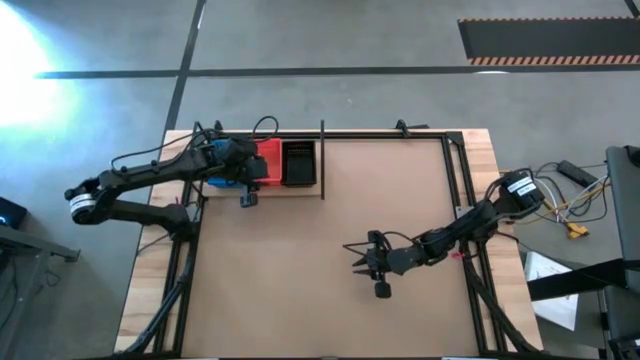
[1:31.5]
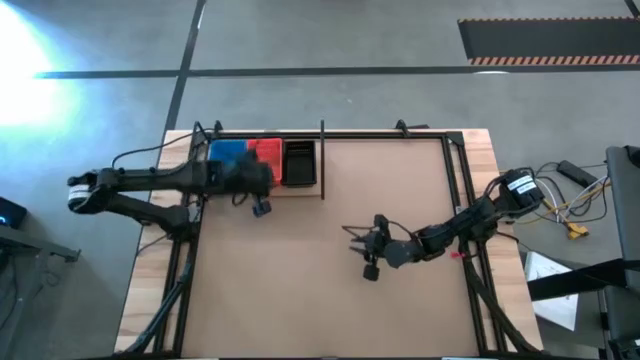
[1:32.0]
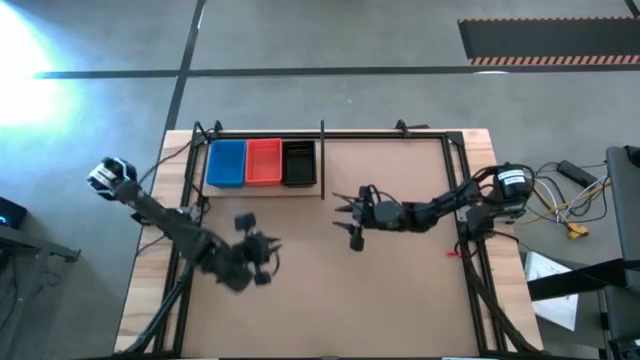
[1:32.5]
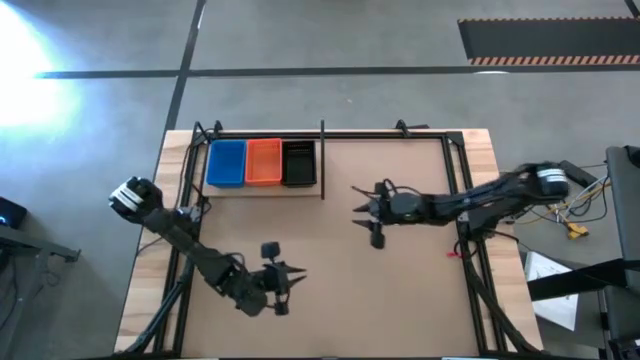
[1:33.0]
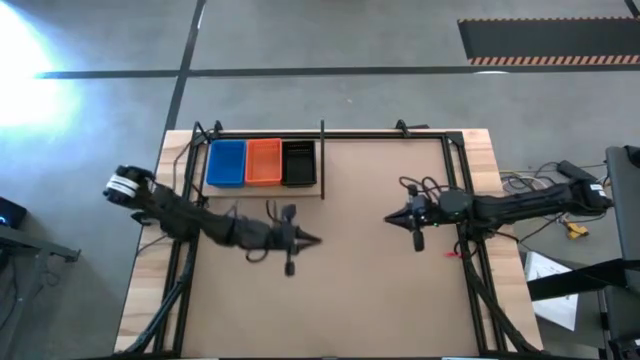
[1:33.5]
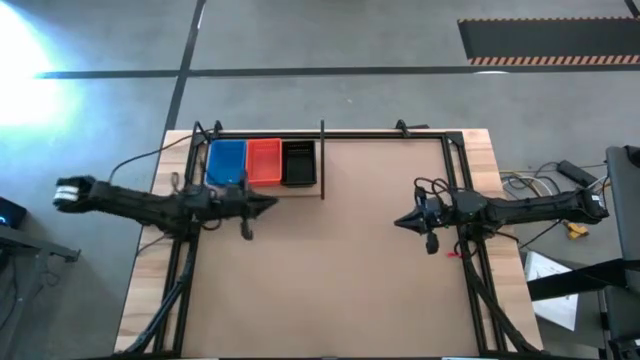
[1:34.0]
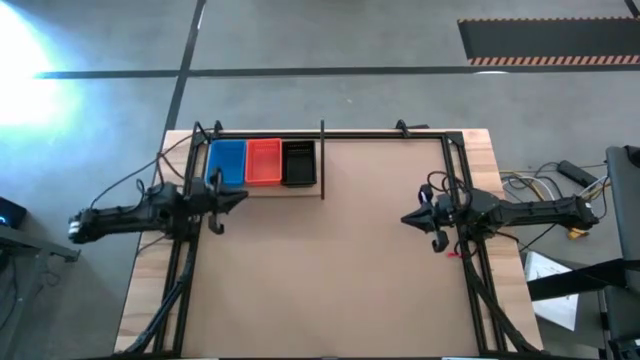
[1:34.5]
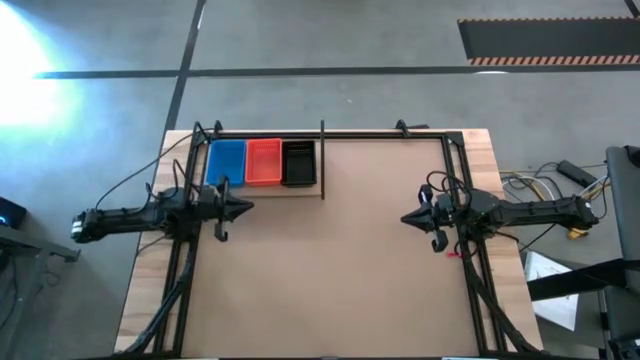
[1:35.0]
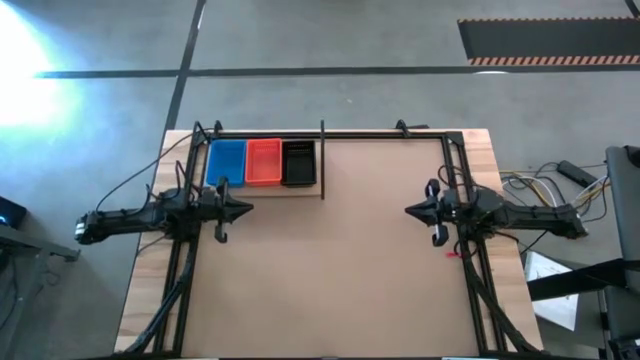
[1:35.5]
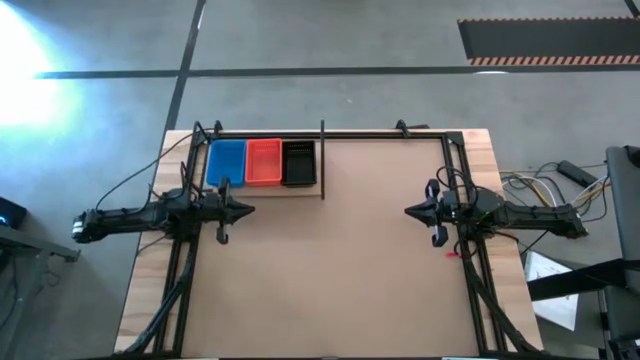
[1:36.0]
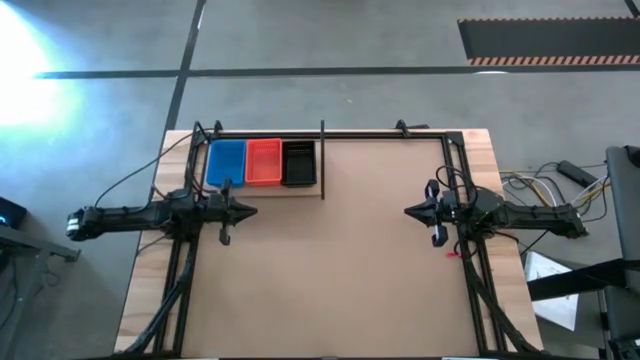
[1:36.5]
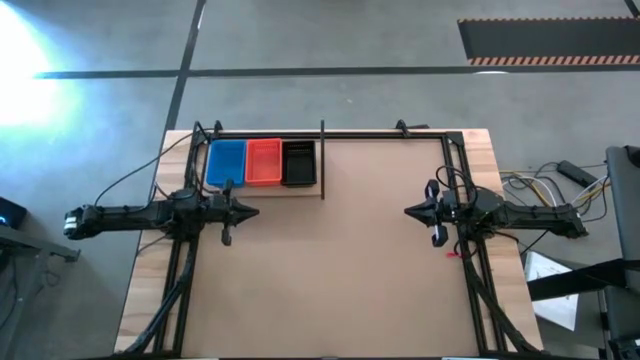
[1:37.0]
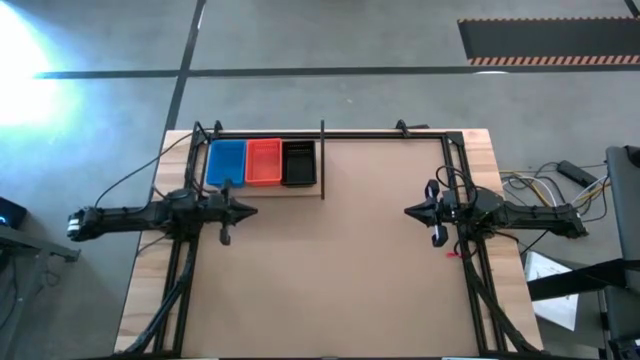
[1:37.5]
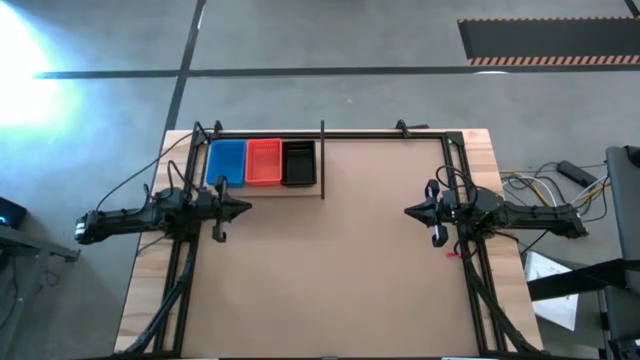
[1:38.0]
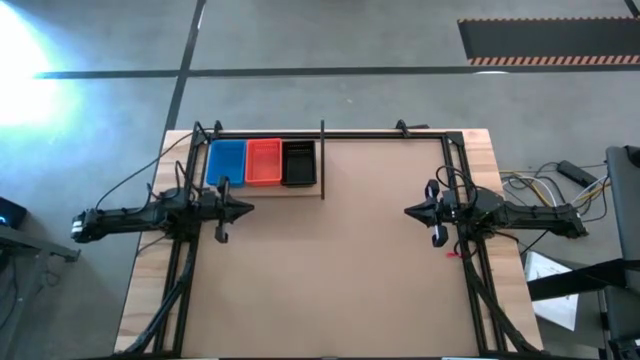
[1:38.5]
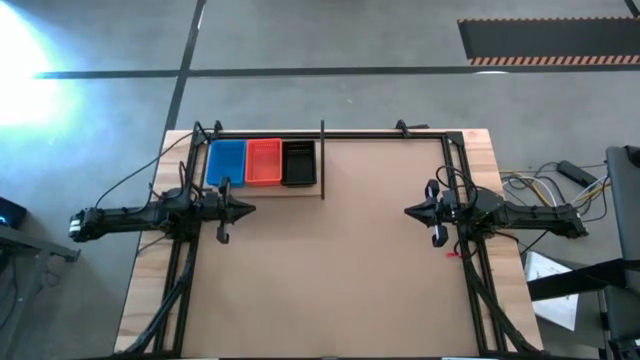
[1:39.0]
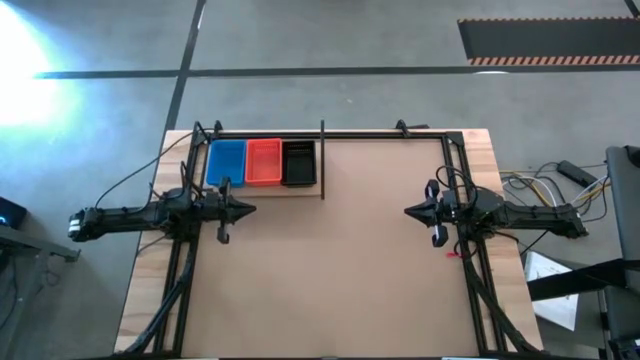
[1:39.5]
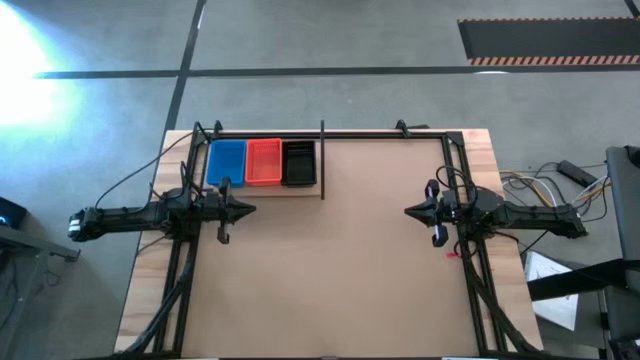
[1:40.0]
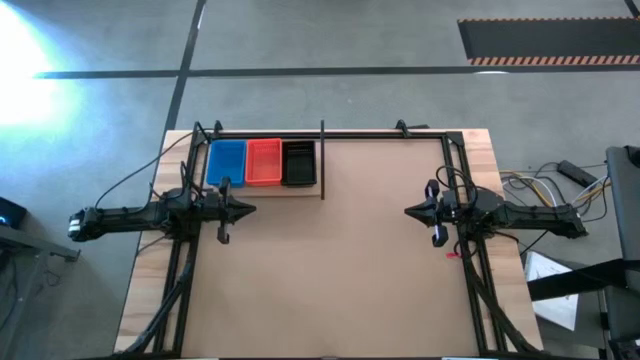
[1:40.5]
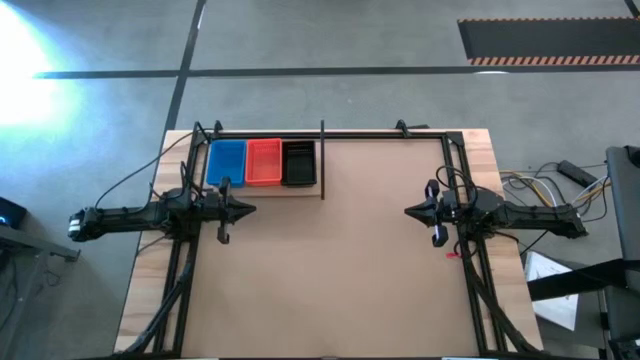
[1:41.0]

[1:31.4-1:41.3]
Task: Stack baskets on shelf by color
Return to Home Position

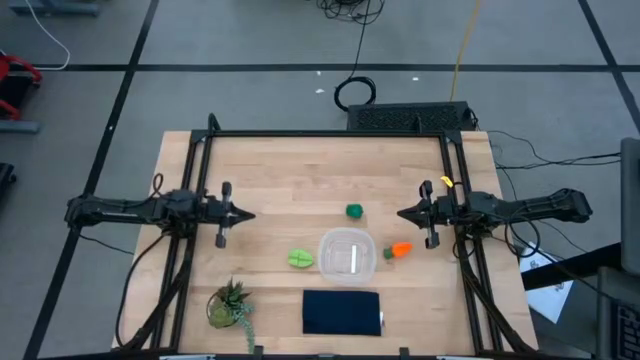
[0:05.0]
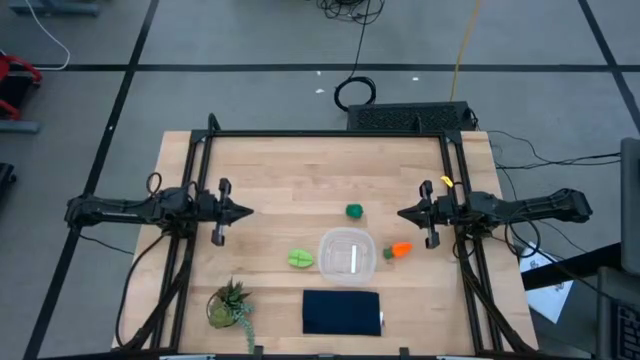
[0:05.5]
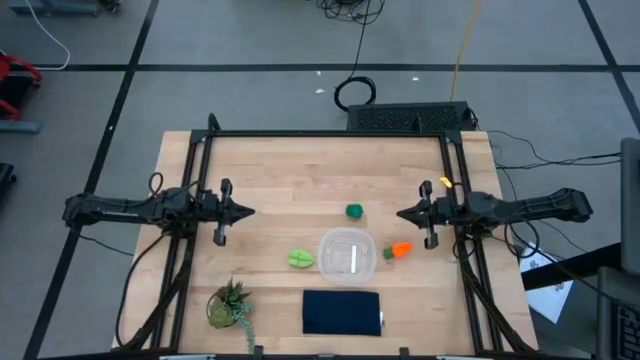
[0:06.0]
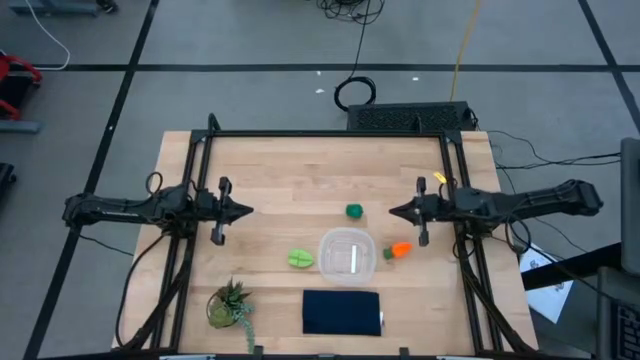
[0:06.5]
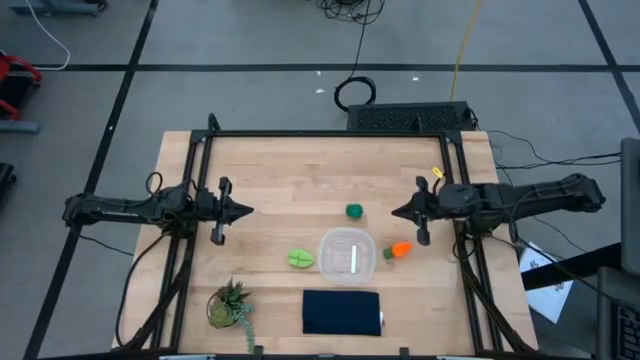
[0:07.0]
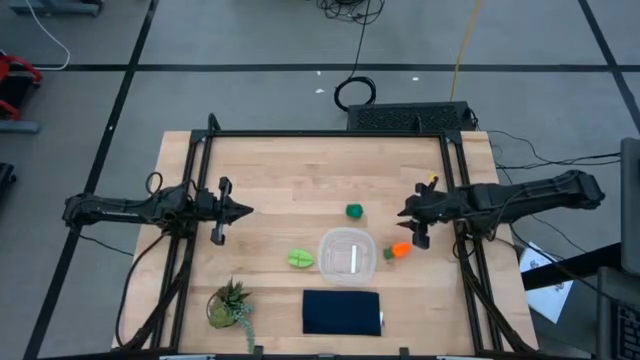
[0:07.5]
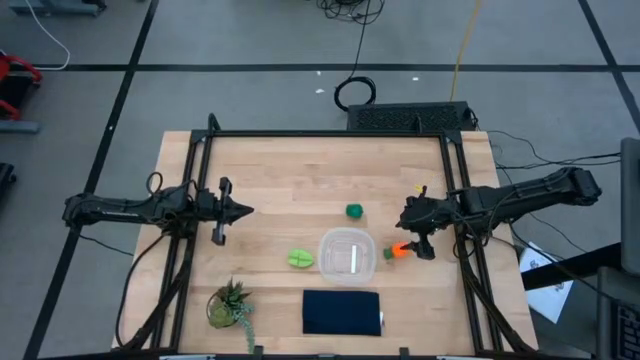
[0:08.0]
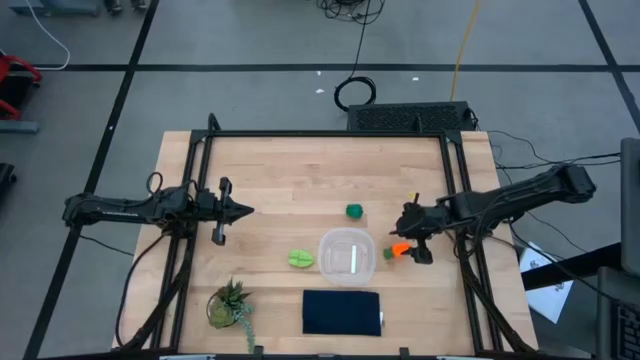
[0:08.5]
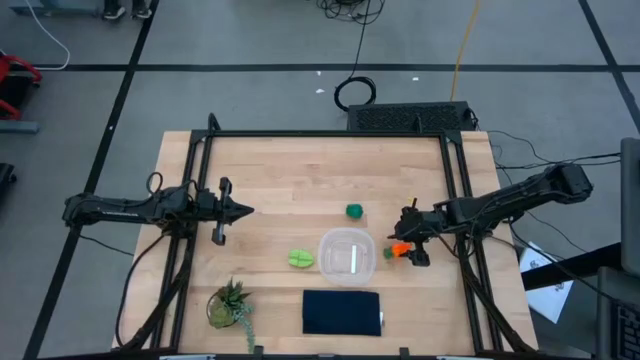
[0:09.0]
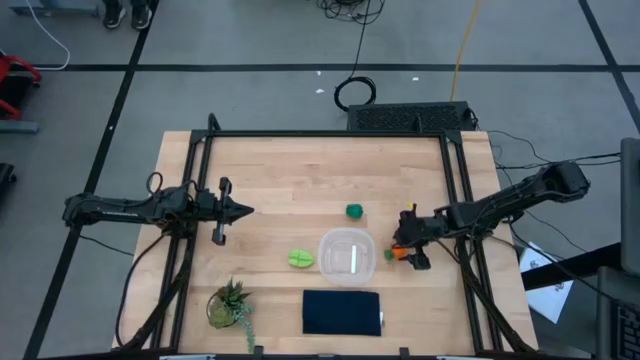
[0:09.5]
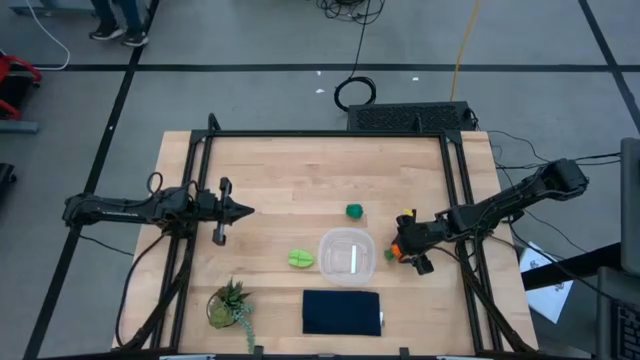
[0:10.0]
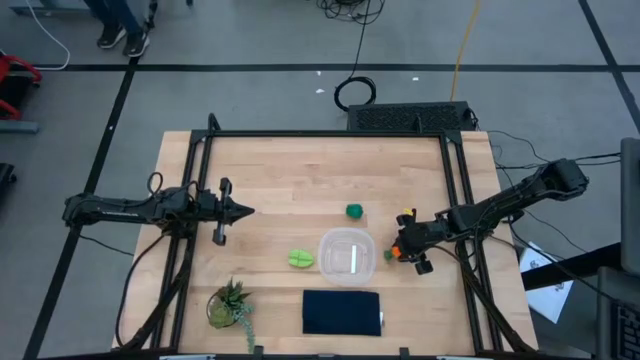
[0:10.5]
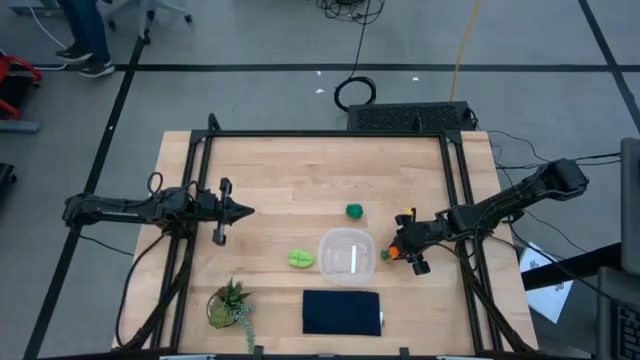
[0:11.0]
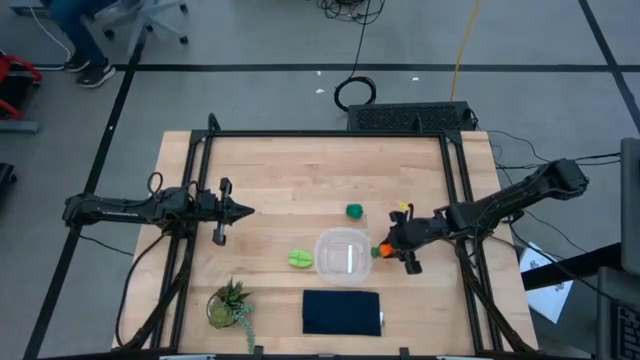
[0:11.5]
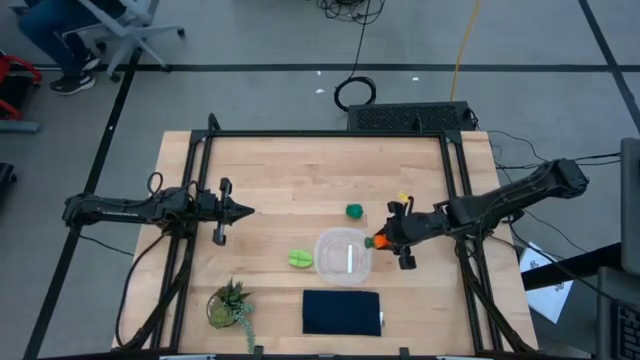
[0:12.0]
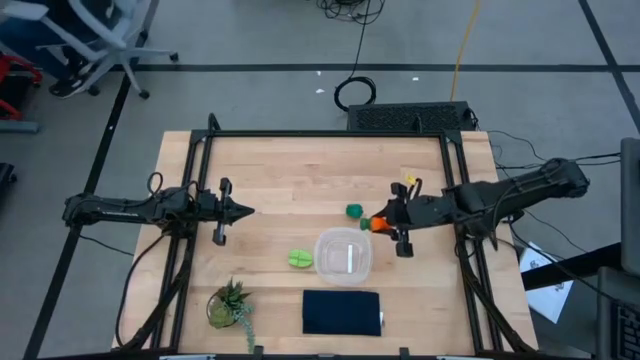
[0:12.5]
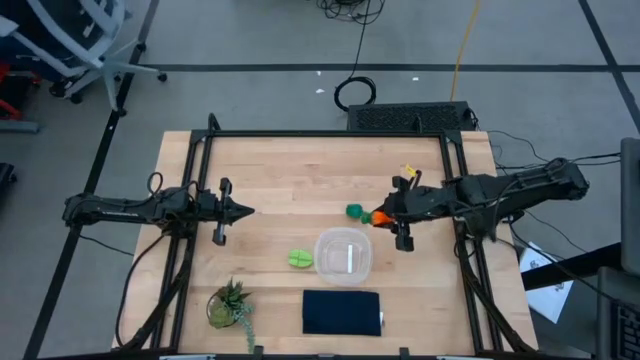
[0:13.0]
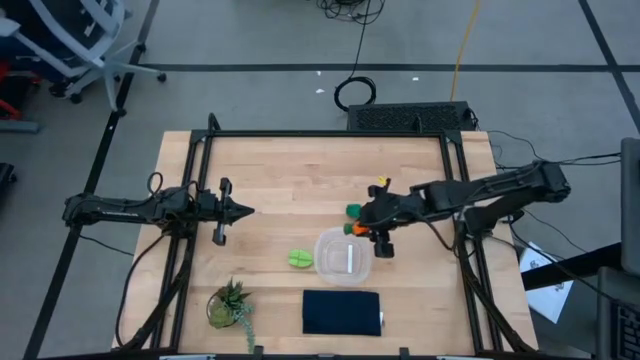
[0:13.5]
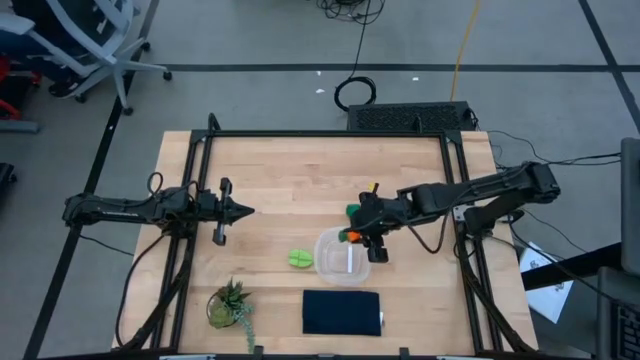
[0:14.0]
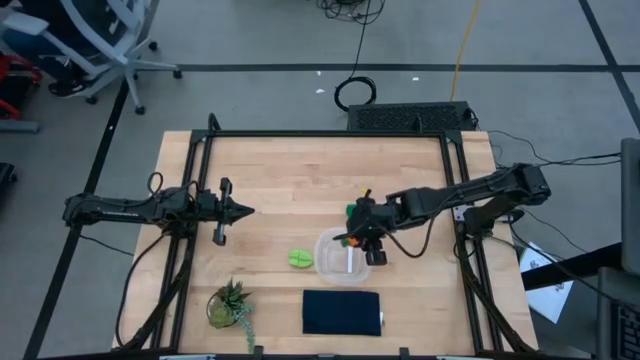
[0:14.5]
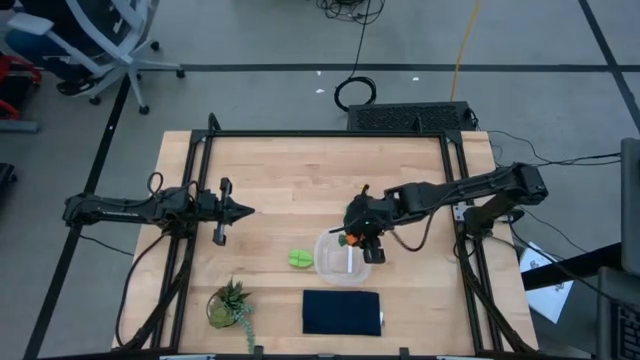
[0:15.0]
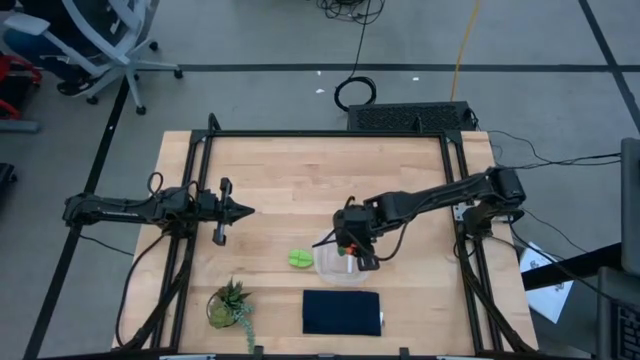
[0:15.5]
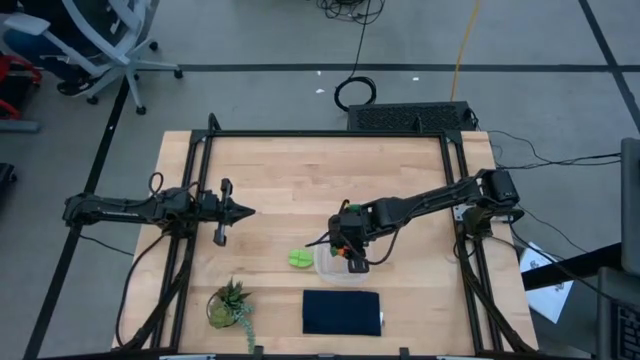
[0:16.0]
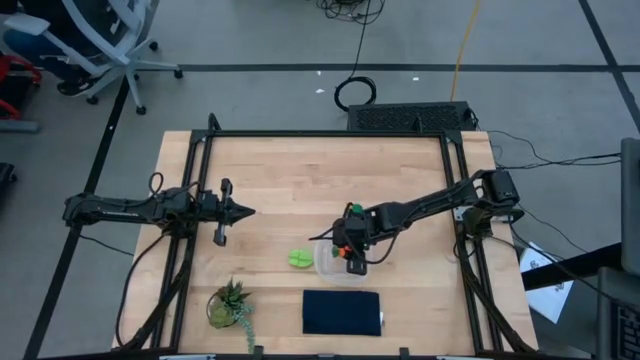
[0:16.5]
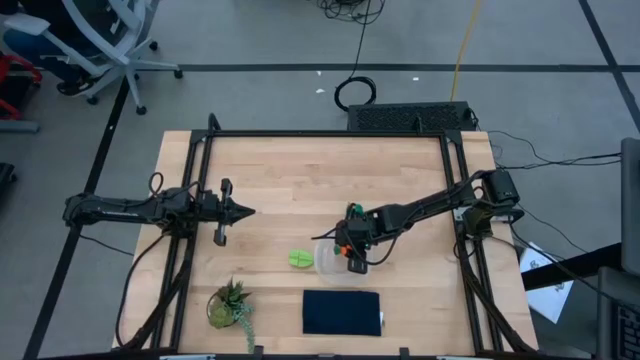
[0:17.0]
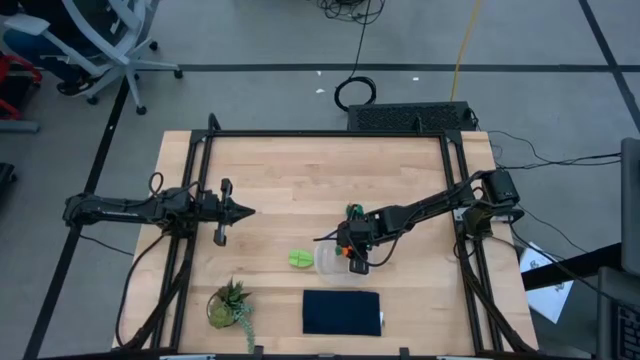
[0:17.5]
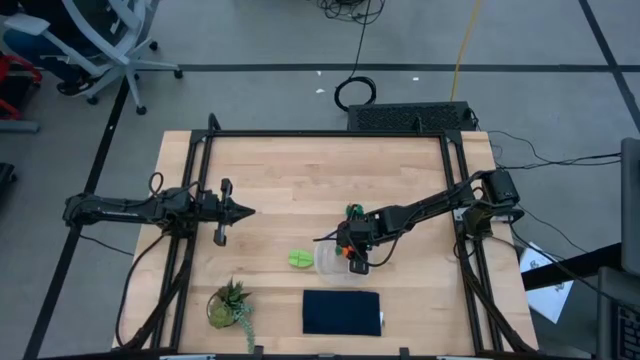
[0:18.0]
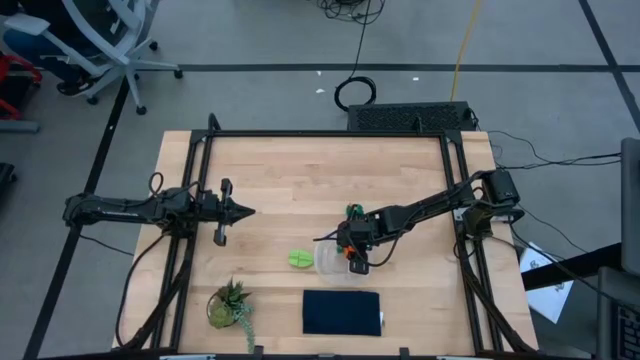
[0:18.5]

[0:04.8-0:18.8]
Task: Pick and placing Produce into tupperware
Put the orange carrot into the transparent bin
